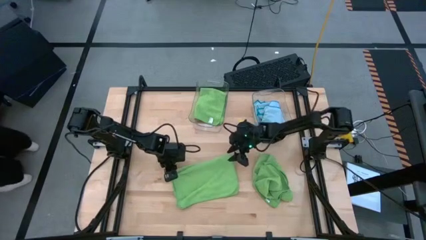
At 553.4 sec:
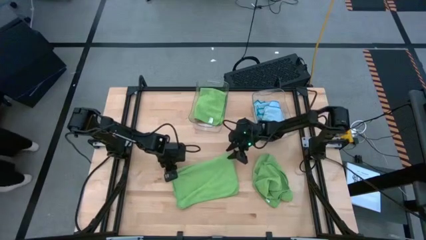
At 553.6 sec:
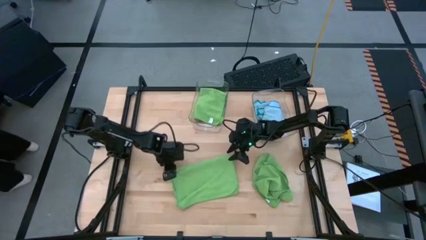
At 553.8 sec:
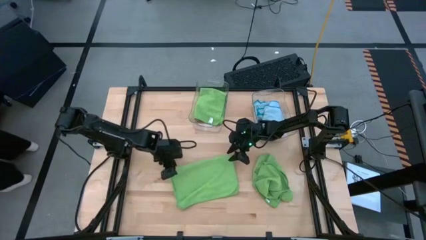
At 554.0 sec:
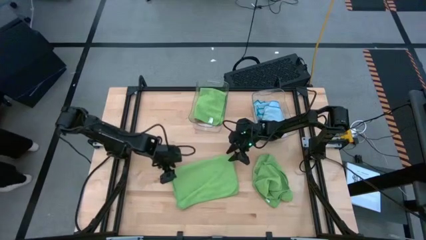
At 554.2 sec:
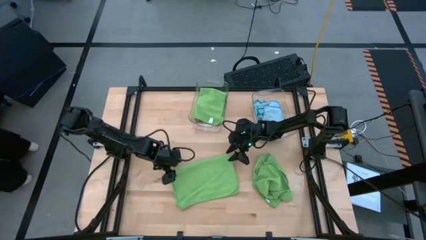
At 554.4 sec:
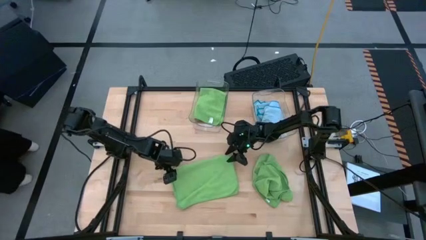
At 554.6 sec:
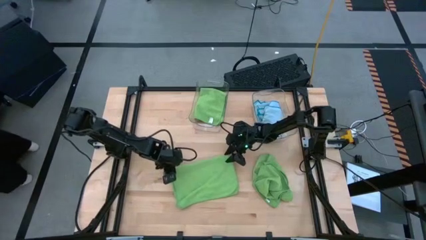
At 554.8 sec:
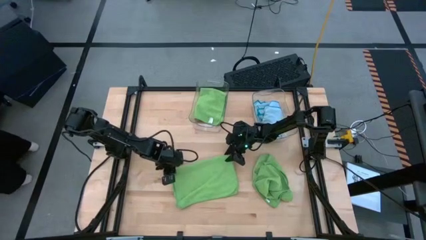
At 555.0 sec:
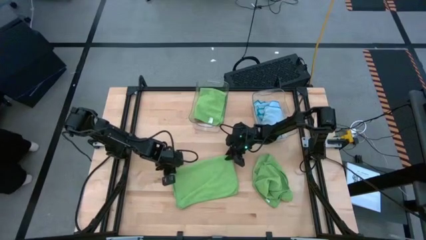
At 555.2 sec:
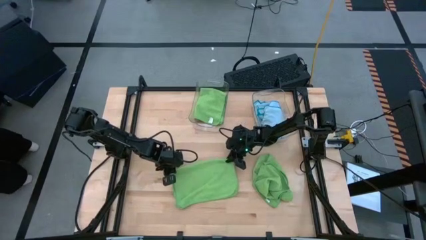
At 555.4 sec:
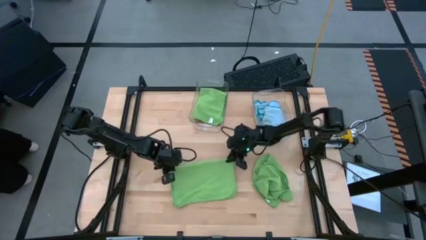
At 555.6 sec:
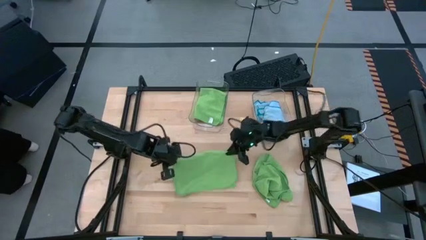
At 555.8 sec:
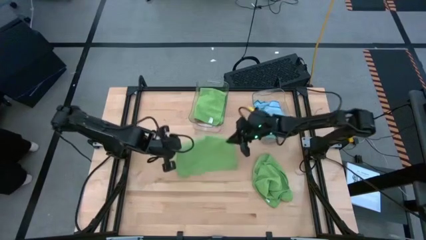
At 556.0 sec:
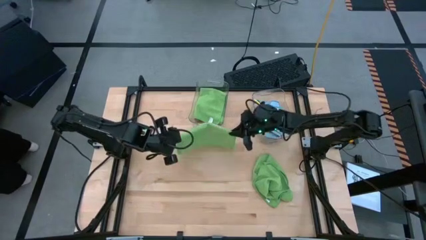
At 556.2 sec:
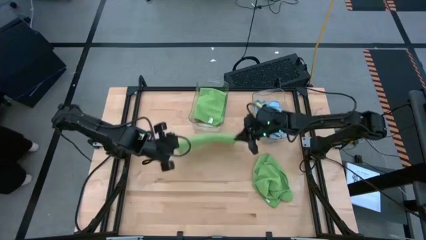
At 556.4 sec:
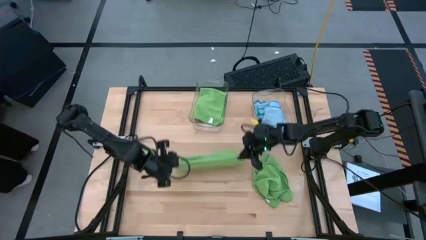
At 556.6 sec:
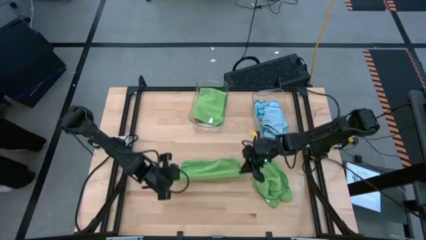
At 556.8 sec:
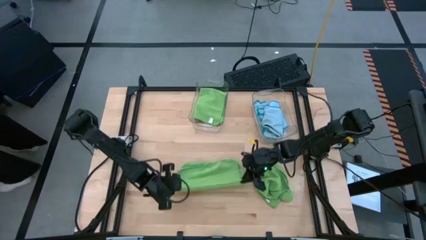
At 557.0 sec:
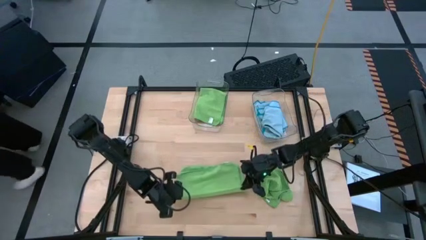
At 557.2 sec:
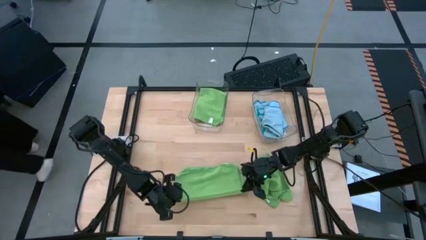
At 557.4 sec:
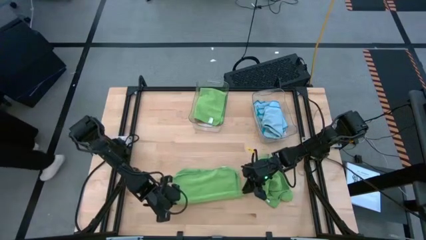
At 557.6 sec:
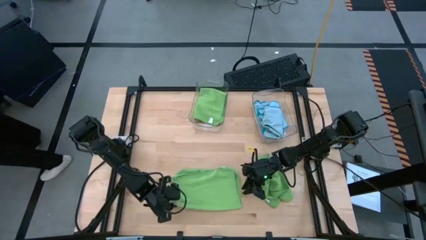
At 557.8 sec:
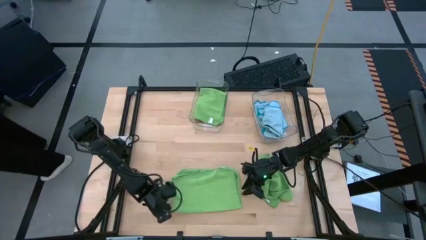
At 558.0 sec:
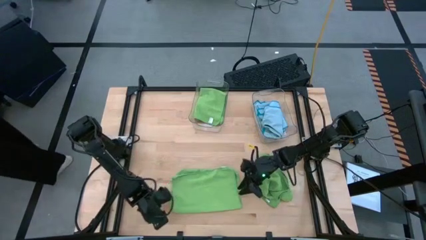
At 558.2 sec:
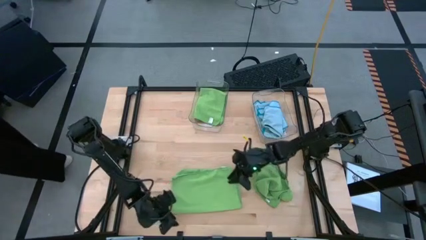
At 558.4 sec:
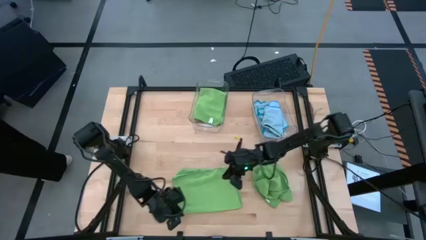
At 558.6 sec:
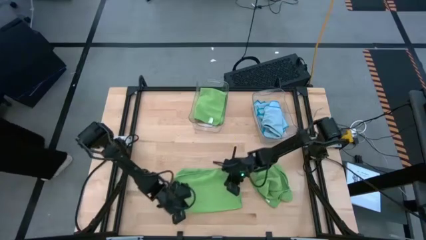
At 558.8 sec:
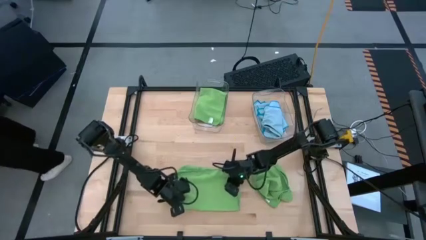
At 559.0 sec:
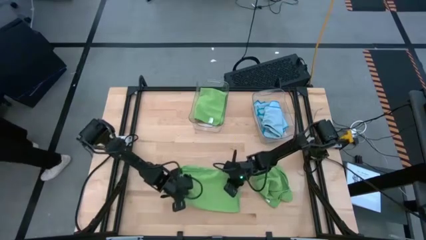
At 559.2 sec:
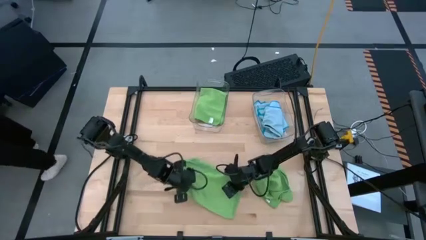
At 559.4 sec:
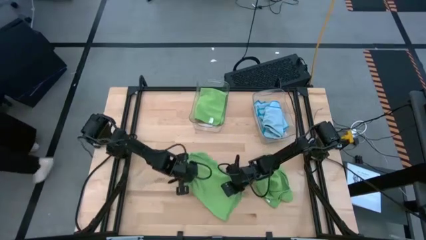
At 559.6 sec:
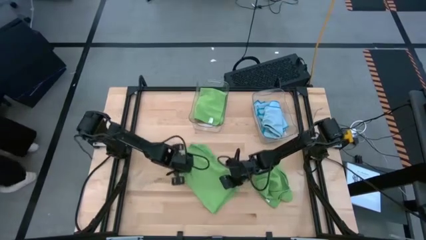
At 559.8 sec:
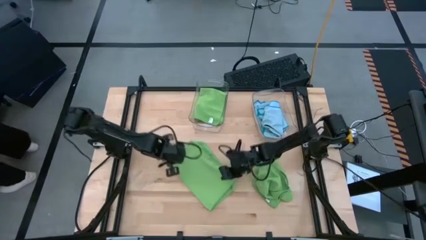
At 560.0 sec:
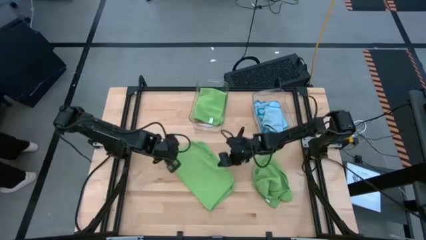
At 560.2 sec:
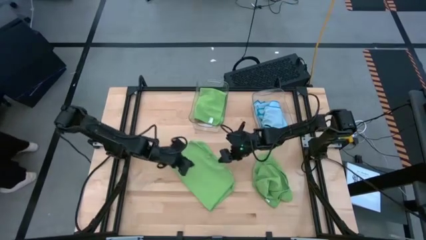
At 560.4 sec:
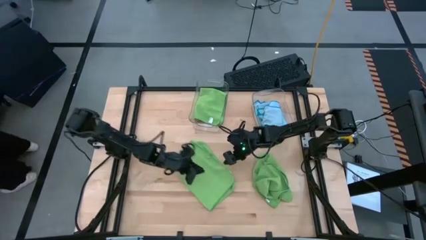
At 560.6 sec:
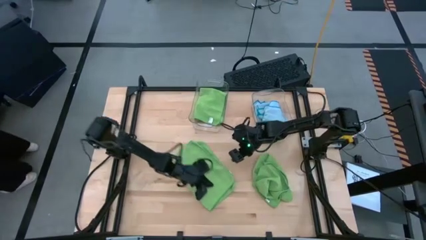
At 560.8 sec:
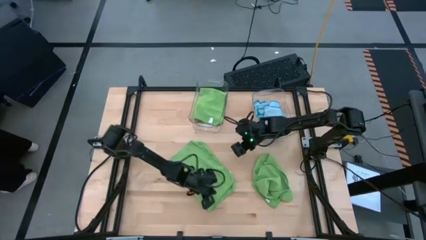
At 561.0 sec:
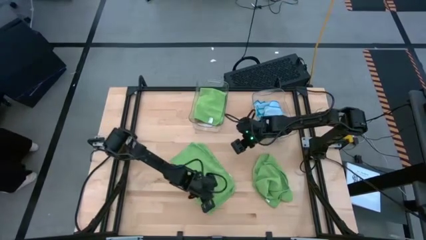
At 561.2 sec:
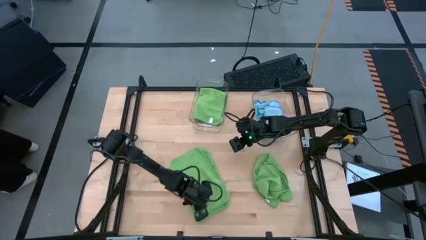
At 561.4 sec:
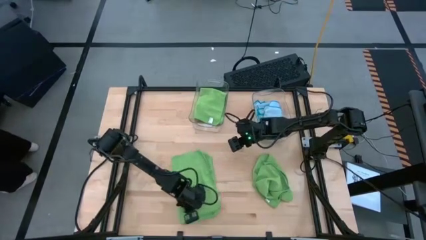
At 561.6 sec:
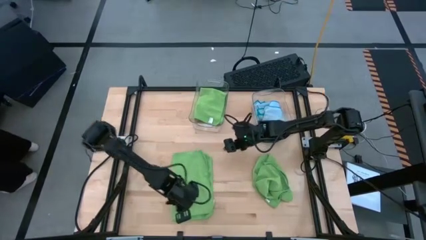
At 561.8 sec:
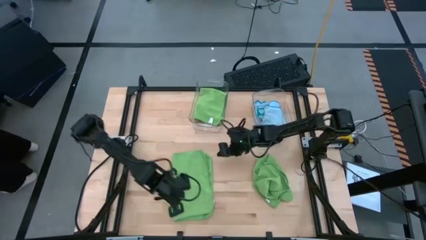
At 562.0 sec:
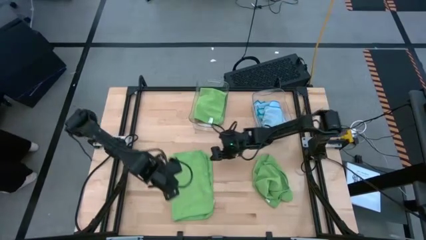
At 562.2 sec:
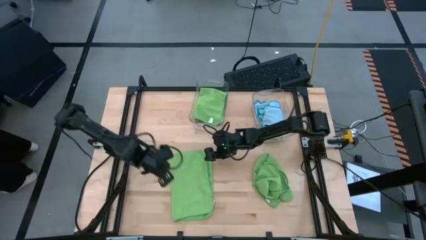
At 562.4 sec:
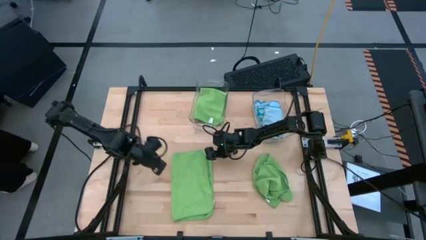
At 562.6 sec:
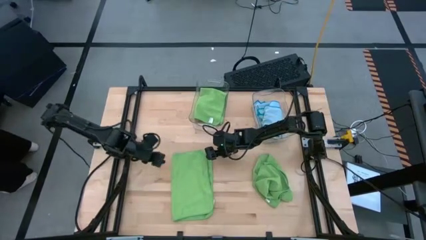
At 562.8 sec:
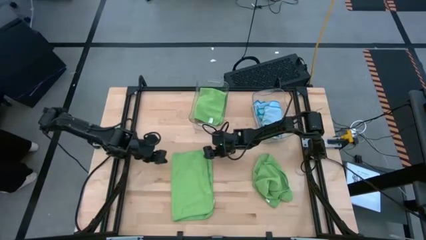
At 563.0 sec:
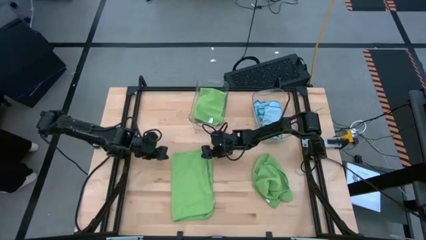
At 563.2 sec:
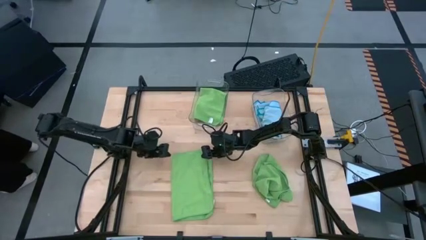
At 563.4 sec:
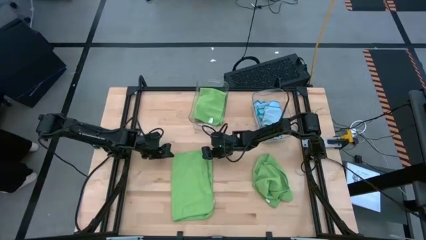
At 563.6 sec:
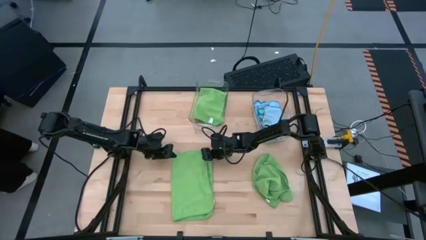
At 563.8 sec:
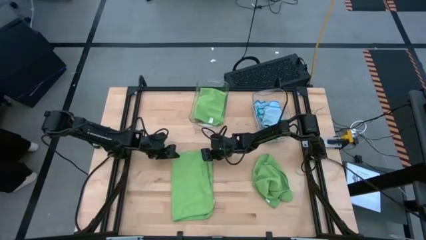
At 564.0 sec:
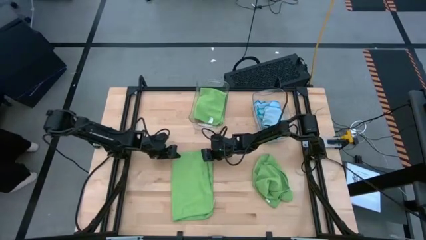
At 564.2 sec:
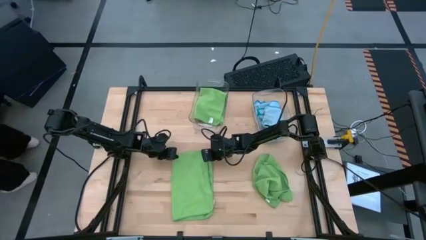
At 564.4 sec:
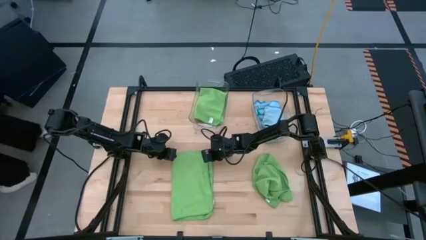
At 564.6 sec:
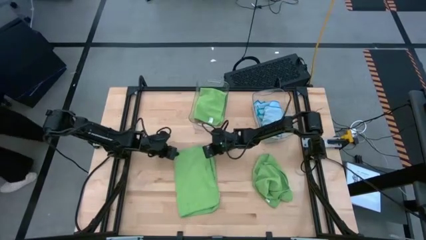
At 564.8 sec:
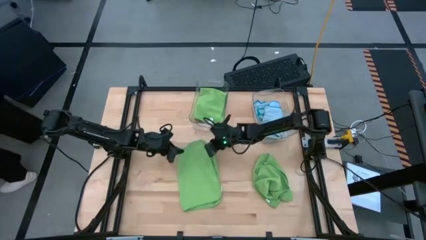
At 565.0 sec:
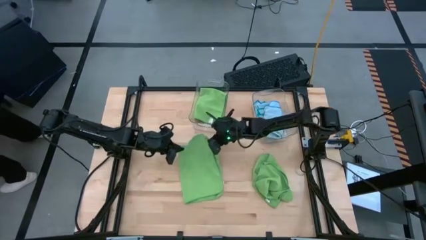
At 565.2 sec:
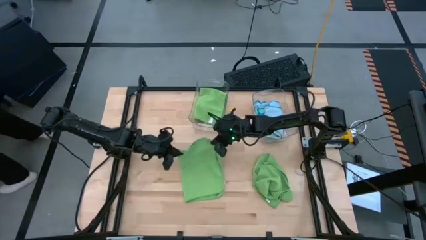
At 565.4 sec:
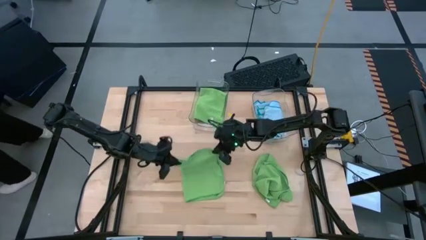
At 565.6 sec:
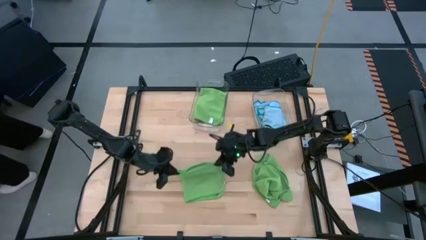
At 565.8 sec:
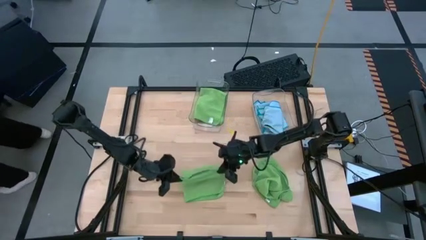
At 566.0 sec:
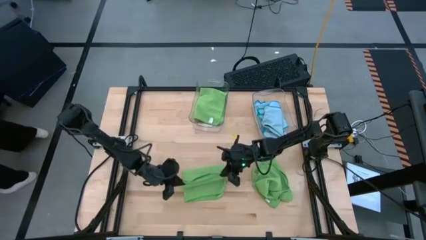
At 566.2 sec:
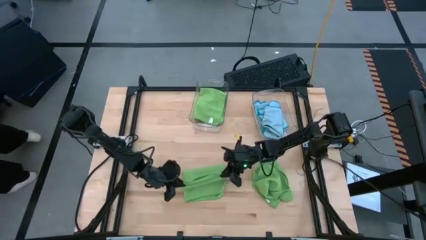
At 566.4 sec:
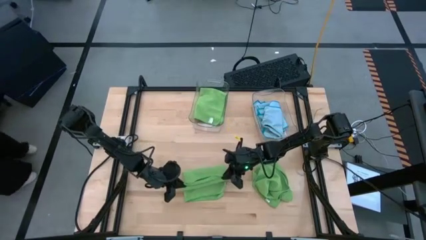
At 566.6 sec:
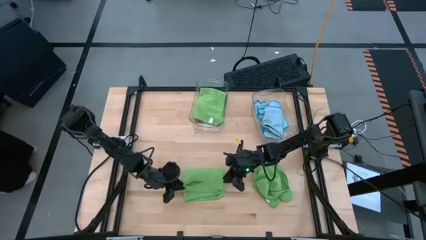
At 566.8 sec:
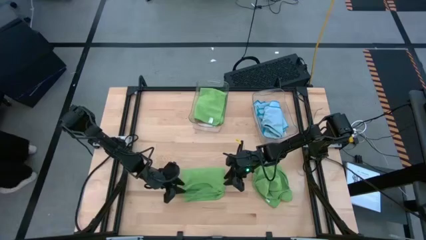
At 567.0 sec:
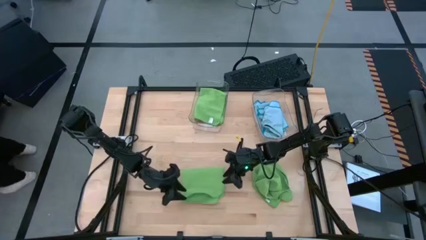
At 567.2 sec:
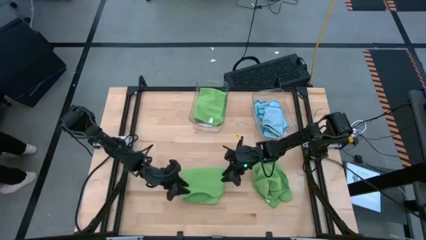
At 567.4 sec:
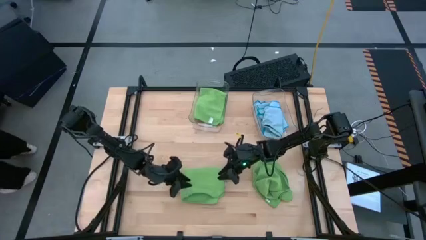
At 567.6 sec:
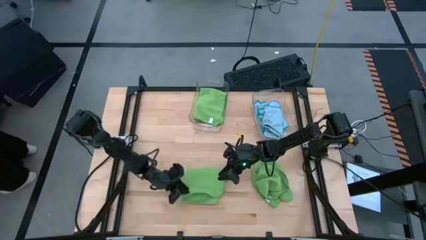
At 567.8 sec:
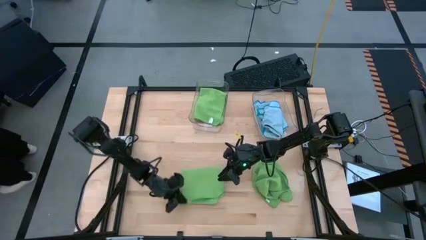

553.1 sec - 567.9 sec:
Task: Fold microfiber towels
Fold the top green microfiber towel
